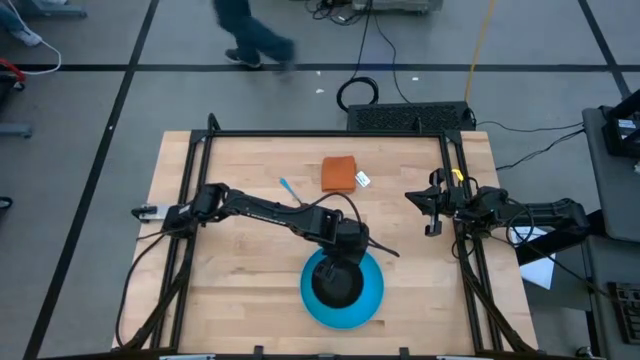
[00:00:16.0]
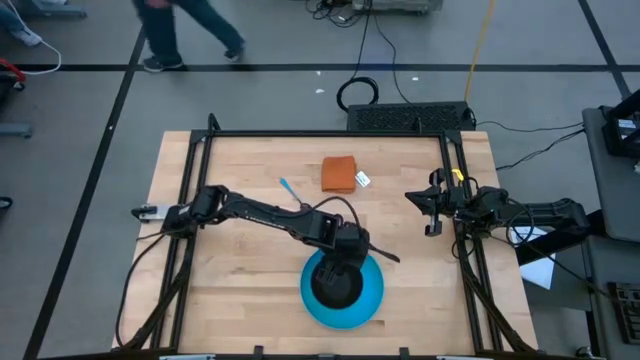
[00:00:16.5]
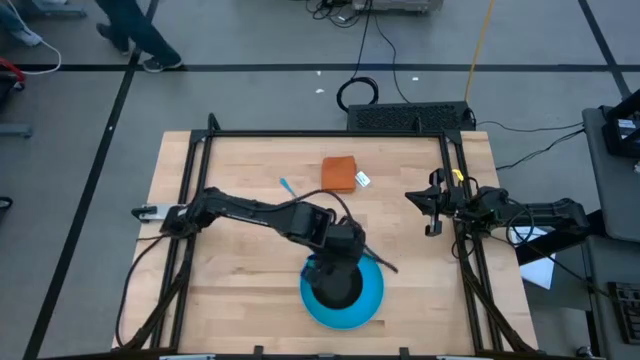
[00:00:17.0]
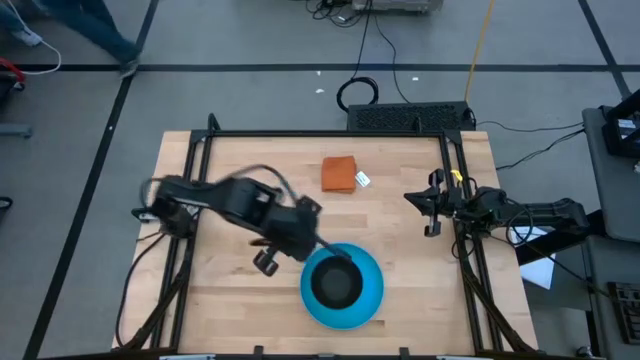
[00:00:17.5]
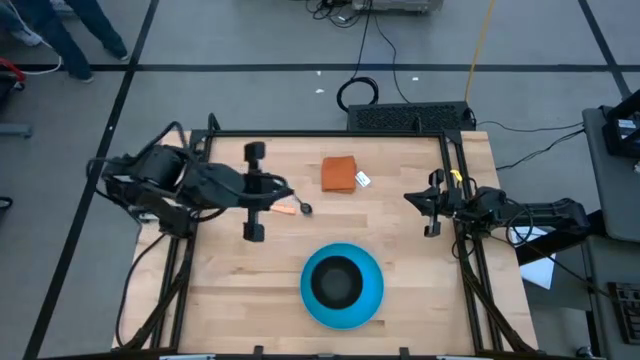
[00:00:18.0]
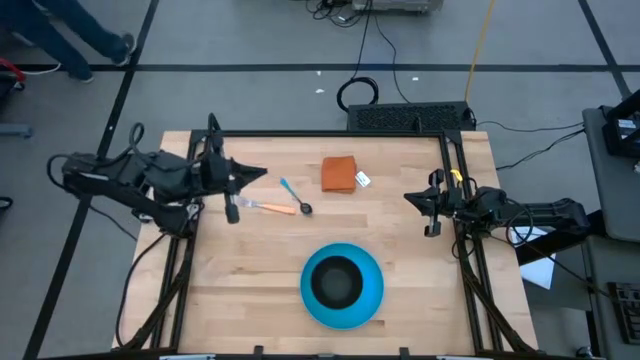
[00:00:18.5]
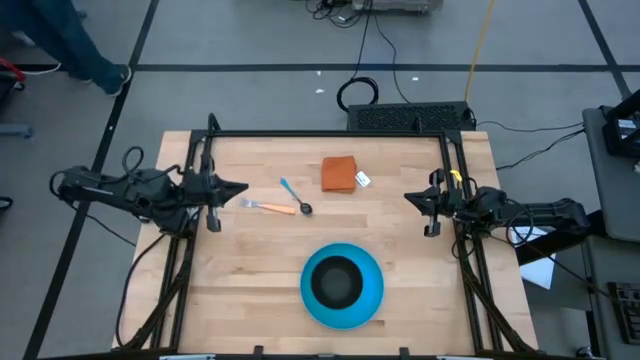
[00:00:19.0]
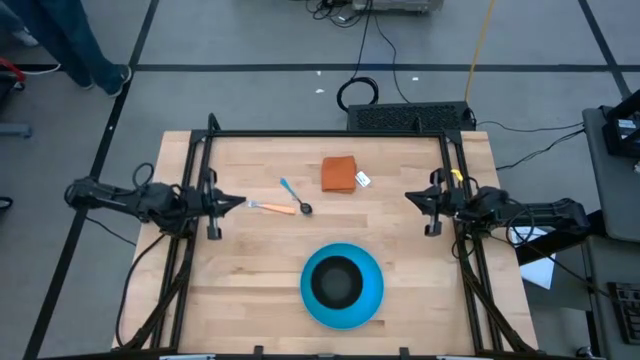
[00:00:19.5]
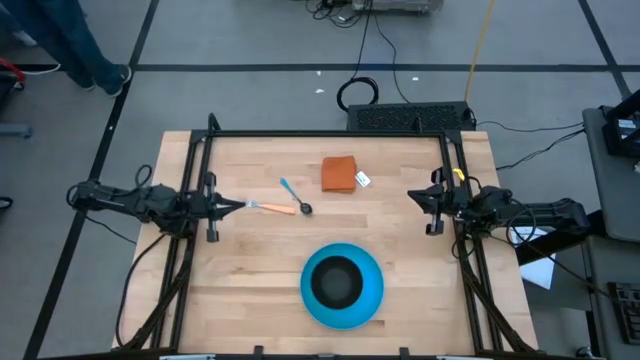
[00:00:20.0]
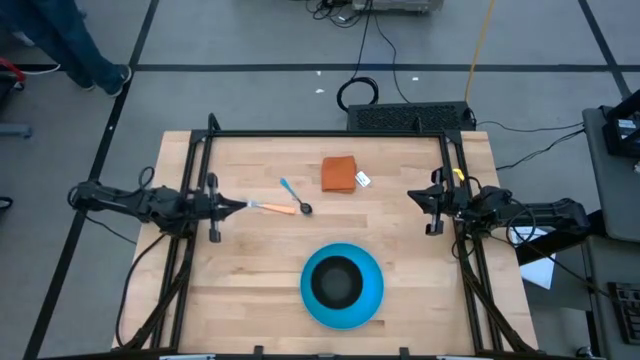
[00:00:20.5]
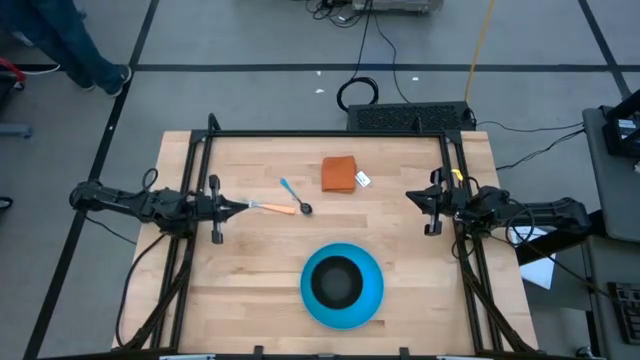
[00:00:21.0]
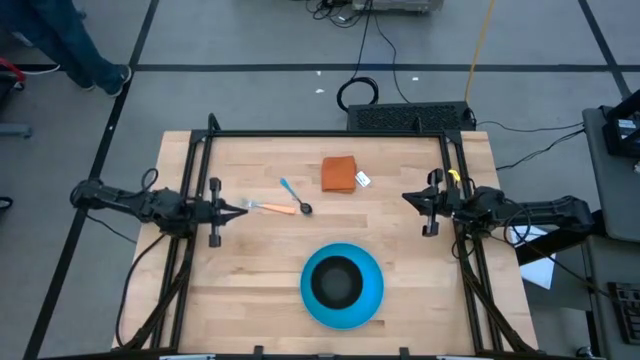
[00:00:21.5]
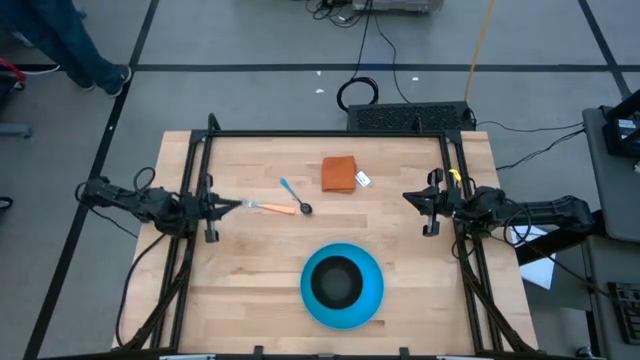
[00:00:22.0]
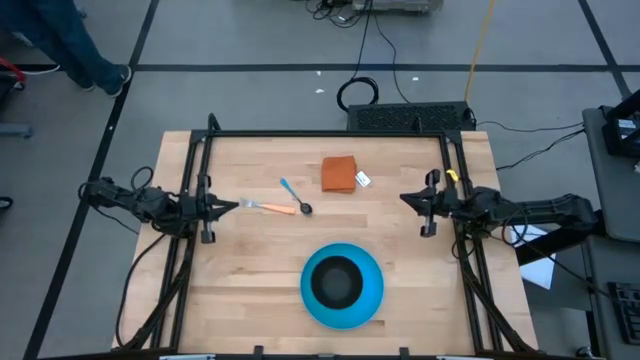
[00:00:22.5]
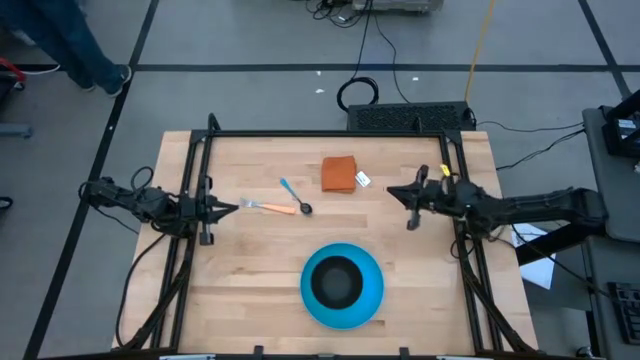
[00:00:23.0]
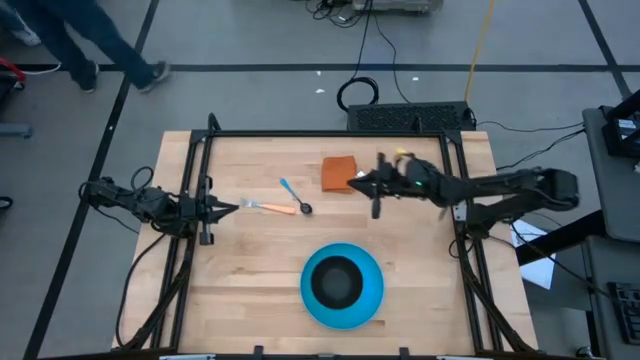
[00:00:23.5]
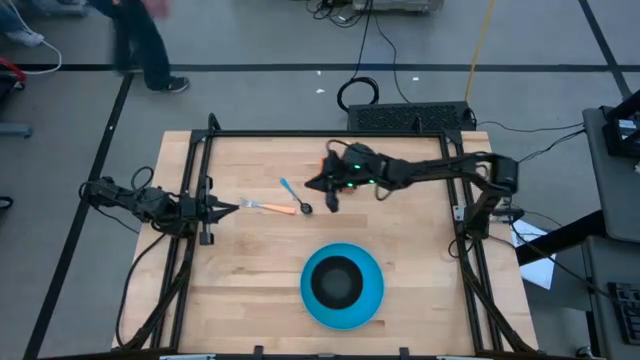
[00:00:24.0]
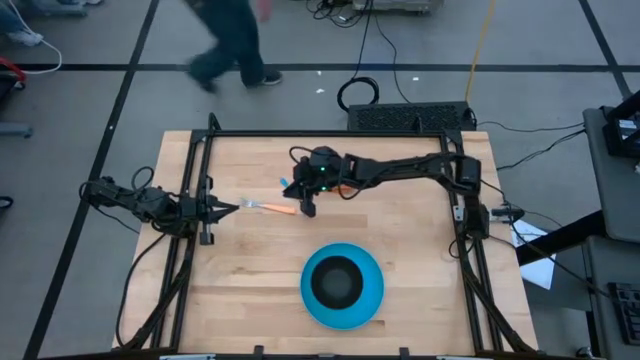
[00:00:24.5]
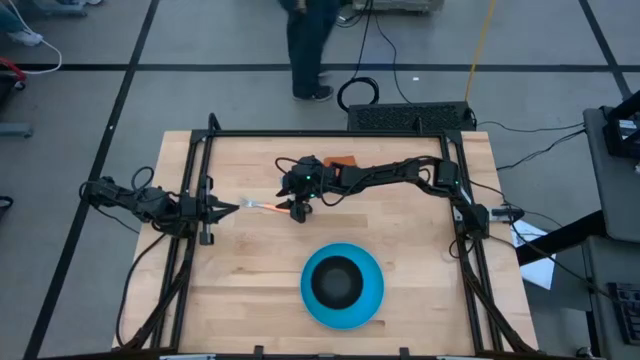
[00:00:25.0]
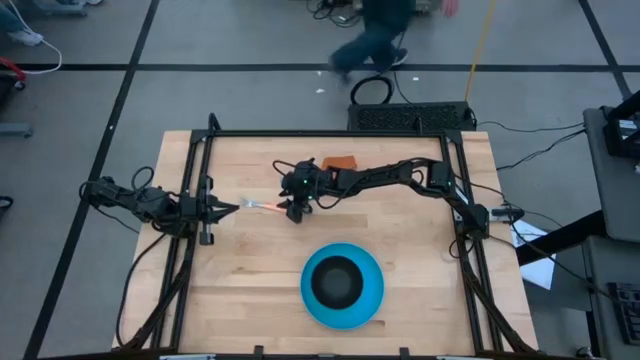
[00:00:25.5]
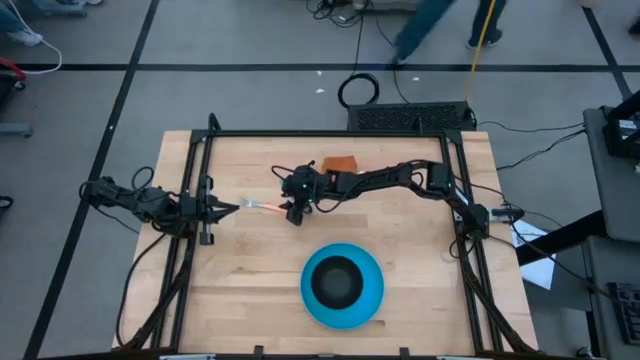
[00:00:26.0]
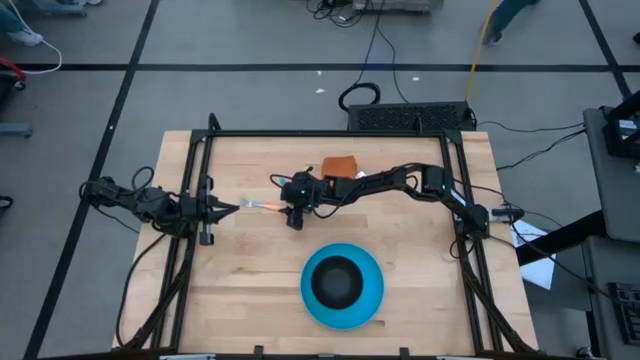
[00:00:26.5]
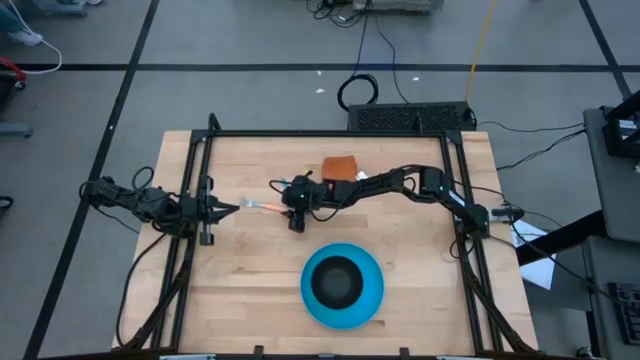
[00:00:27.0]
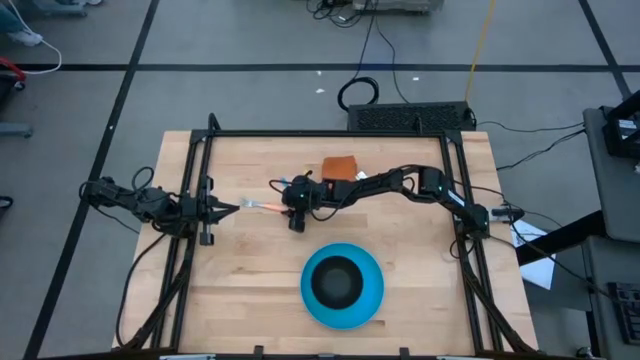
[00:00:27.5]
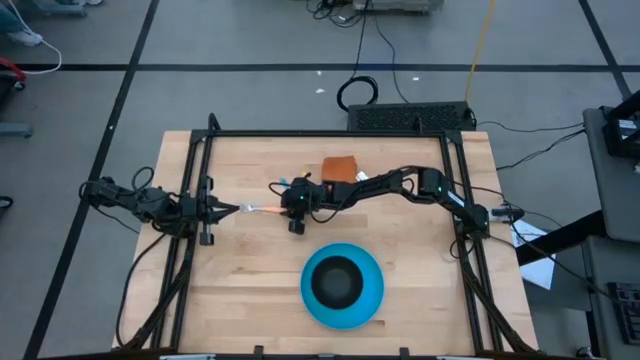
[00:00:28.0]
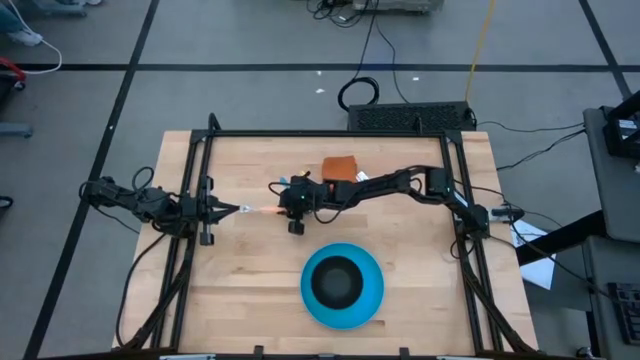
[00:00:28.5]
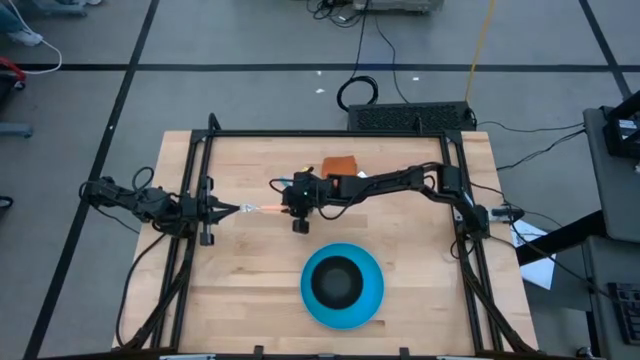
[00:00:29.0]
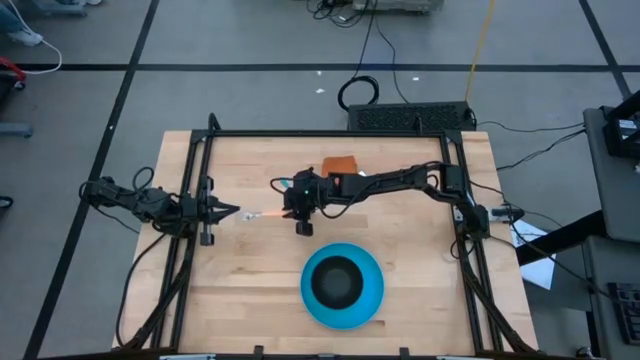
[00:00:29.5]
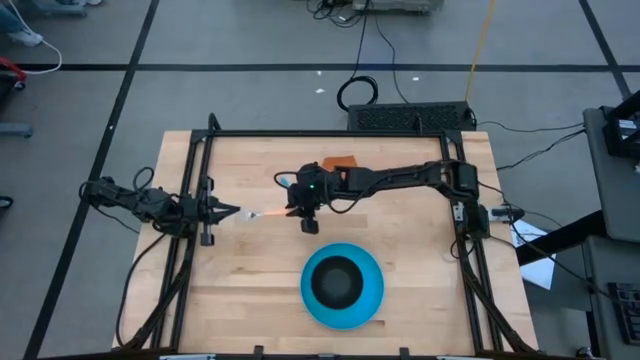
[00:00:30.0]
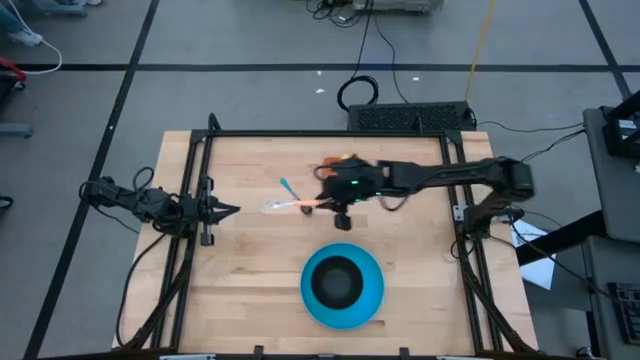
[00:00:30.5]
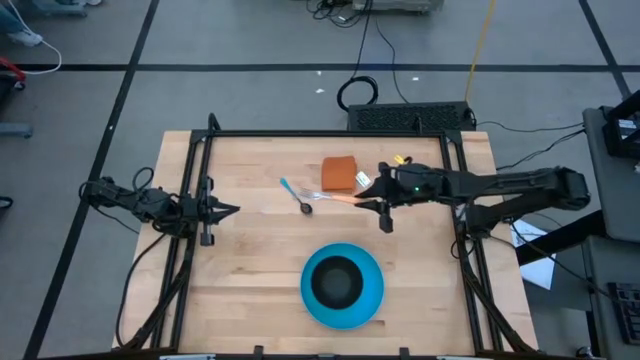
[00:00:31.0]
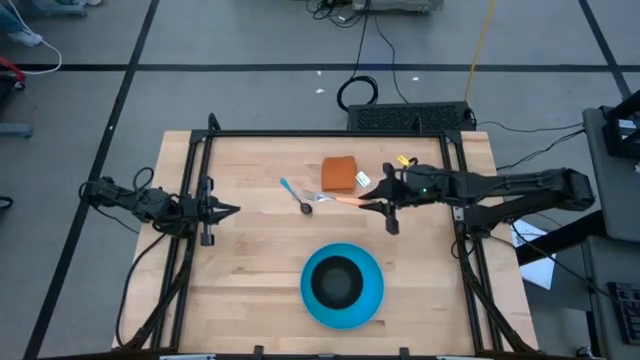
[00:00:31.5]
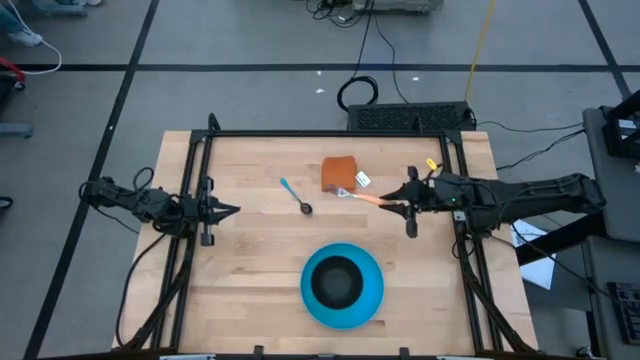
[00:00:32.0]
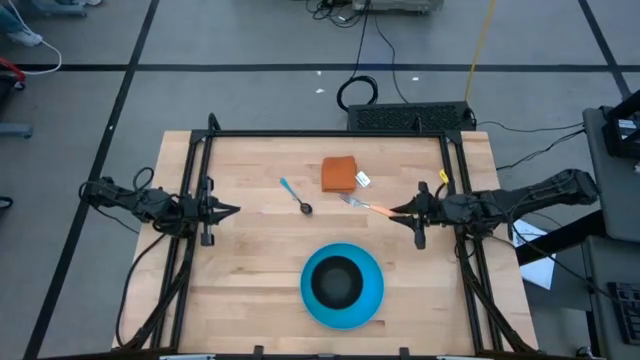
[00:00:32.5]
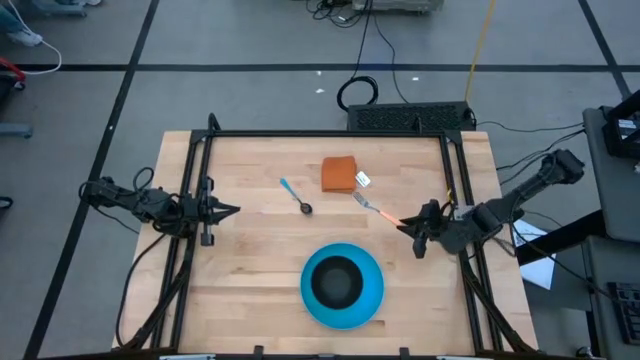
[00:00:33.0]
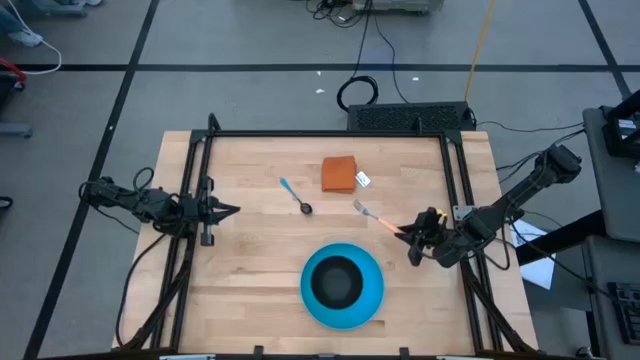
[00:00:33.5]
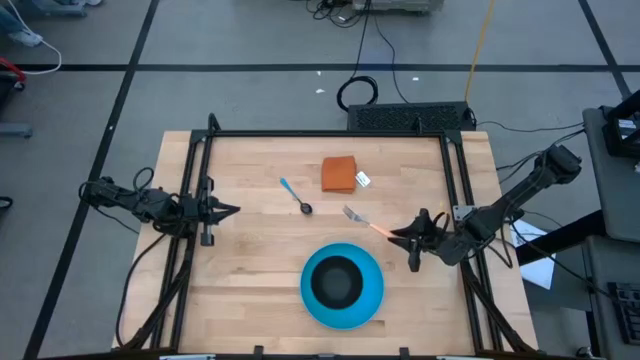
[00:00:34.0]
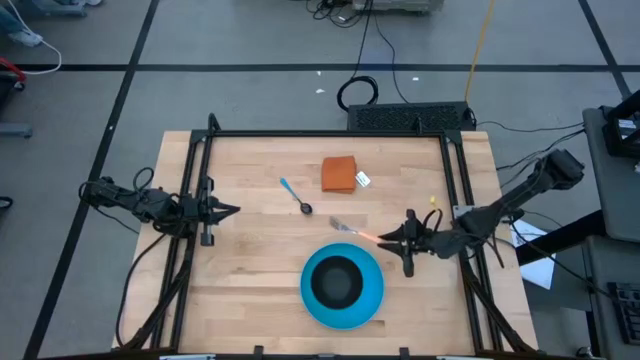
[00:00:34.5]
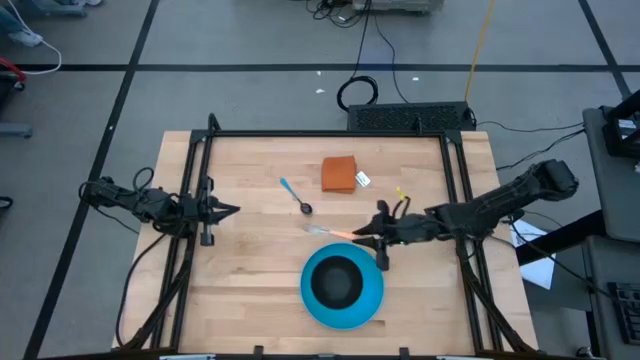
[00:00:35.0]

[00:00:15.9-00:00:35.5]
Task: Set table place
Put the orange fork on the left side of the blue plate
